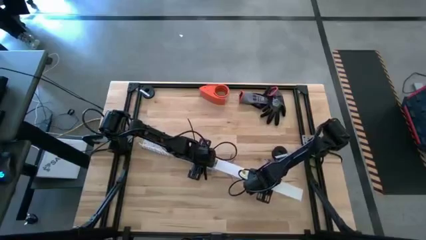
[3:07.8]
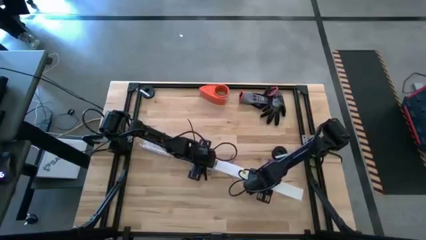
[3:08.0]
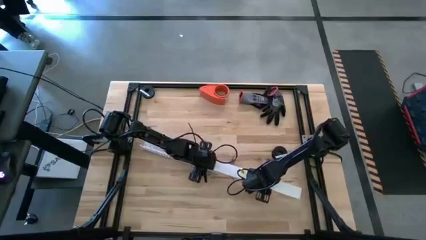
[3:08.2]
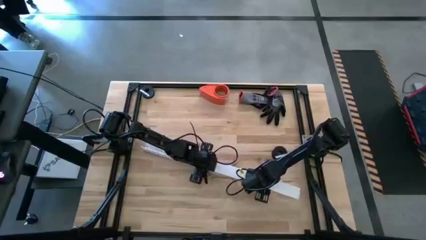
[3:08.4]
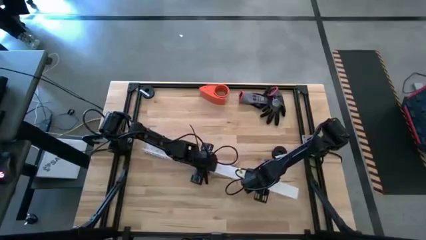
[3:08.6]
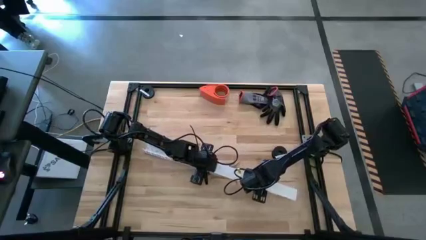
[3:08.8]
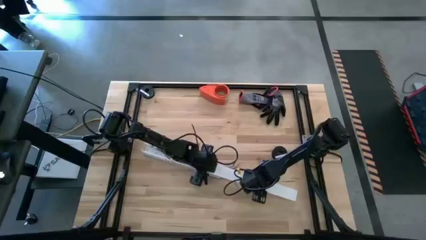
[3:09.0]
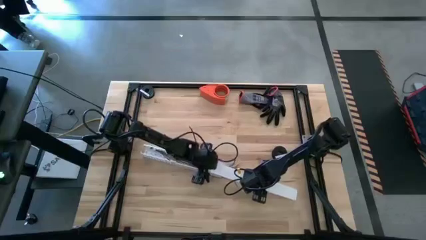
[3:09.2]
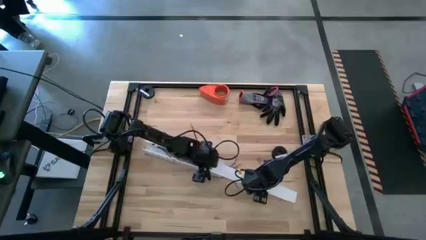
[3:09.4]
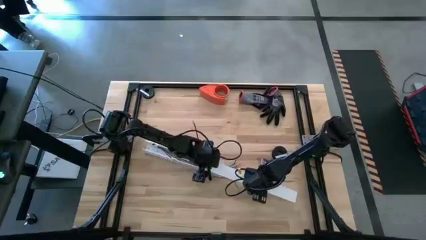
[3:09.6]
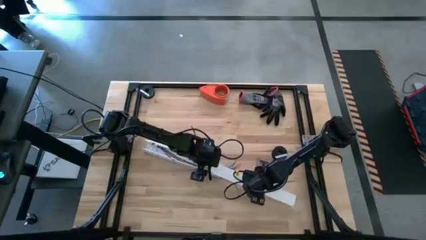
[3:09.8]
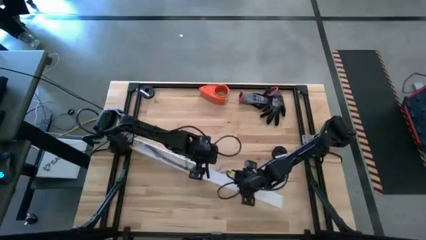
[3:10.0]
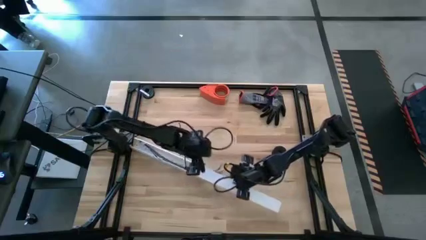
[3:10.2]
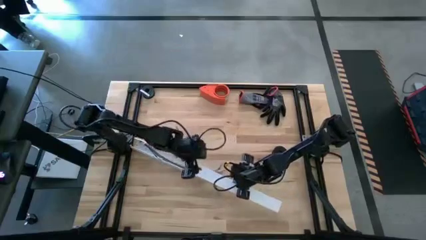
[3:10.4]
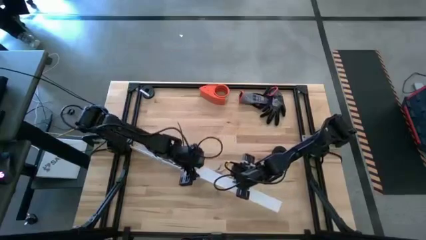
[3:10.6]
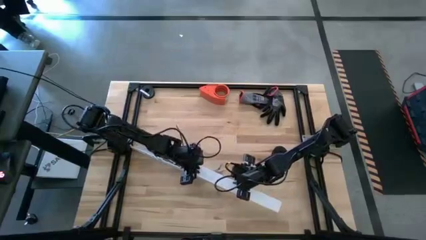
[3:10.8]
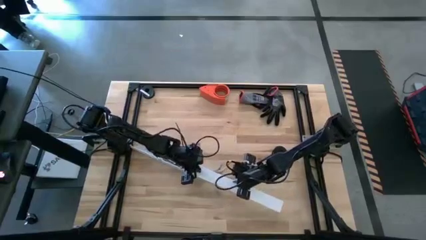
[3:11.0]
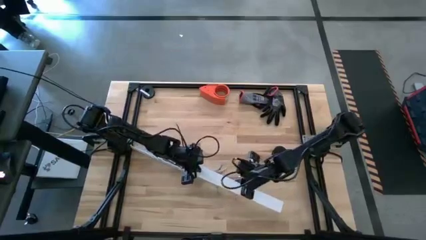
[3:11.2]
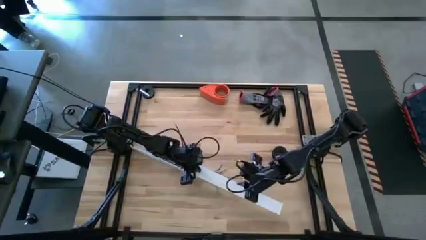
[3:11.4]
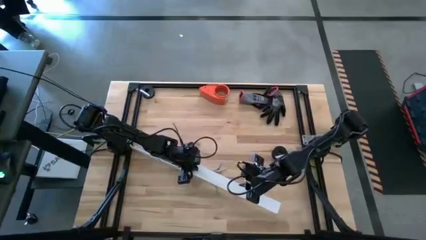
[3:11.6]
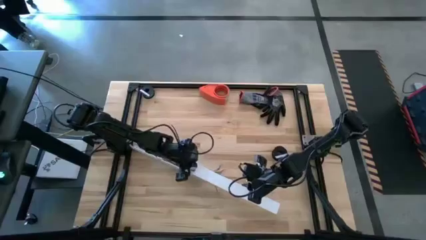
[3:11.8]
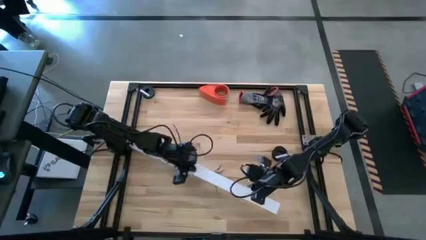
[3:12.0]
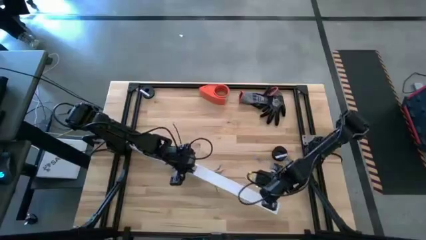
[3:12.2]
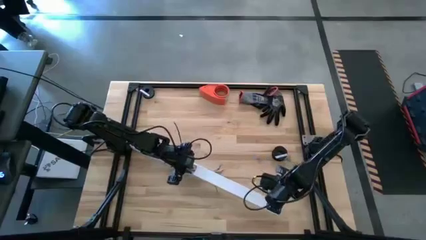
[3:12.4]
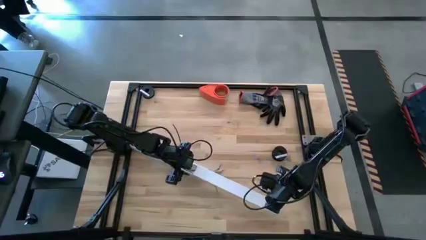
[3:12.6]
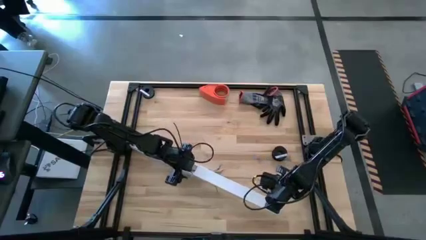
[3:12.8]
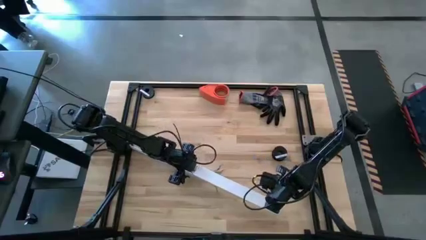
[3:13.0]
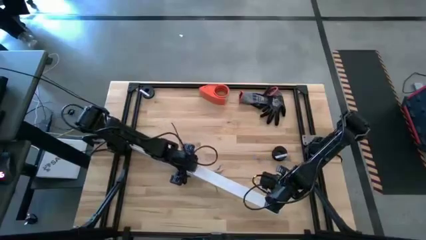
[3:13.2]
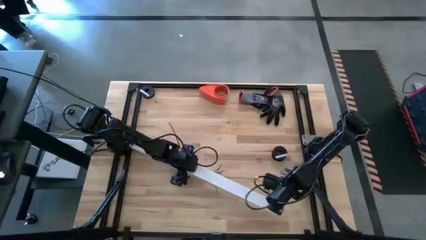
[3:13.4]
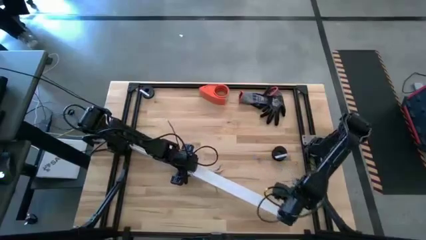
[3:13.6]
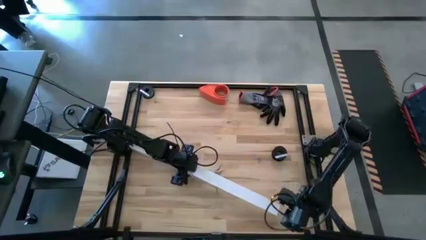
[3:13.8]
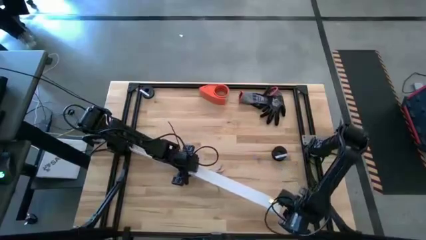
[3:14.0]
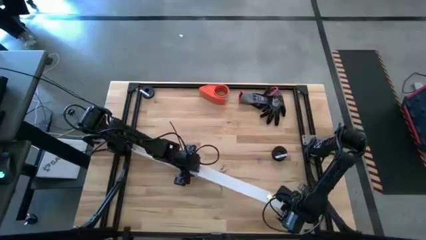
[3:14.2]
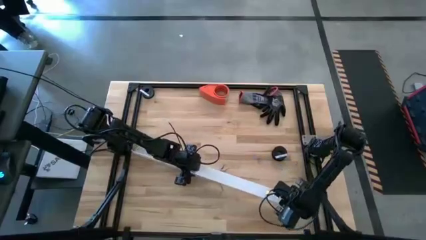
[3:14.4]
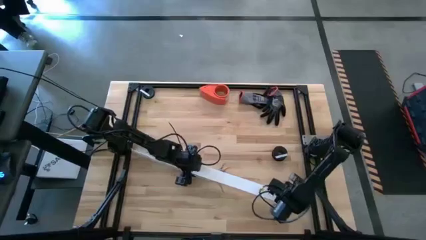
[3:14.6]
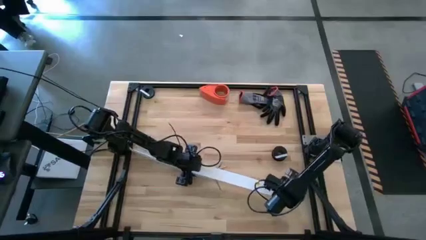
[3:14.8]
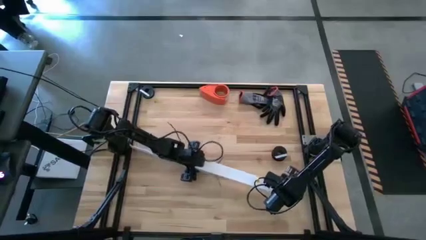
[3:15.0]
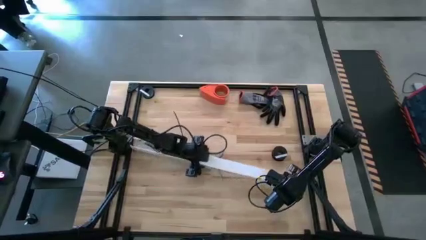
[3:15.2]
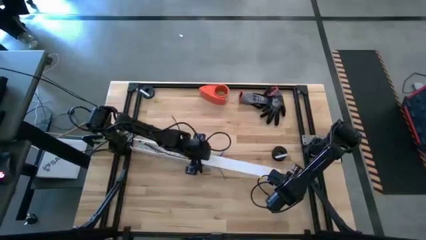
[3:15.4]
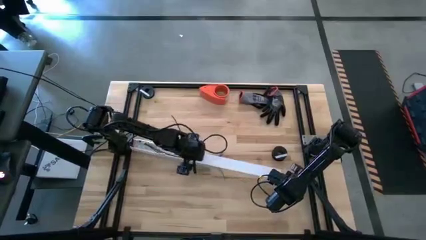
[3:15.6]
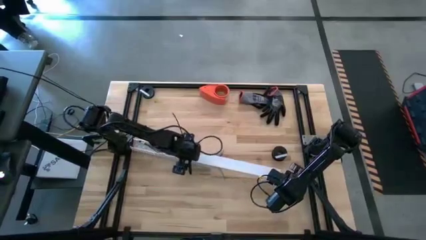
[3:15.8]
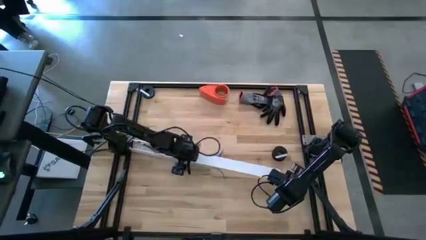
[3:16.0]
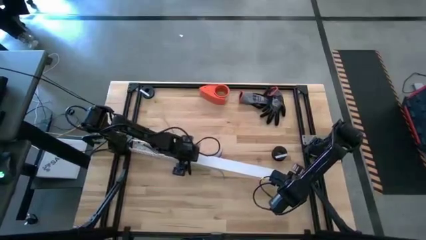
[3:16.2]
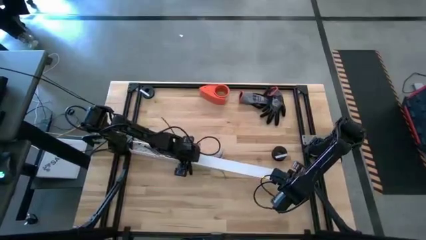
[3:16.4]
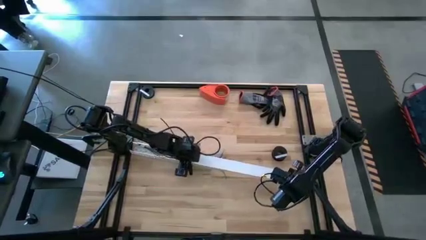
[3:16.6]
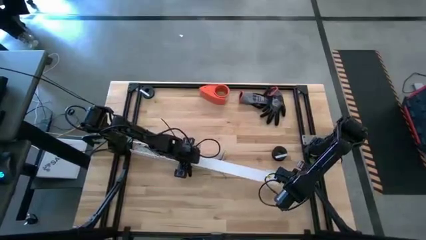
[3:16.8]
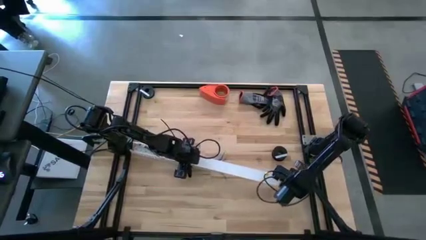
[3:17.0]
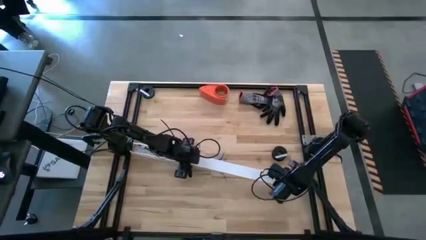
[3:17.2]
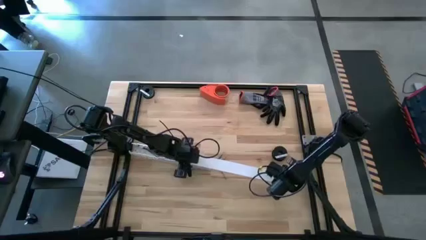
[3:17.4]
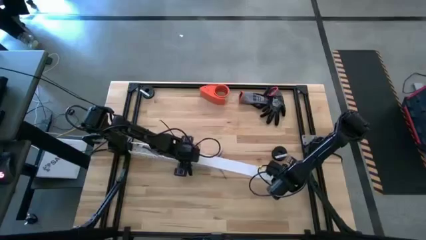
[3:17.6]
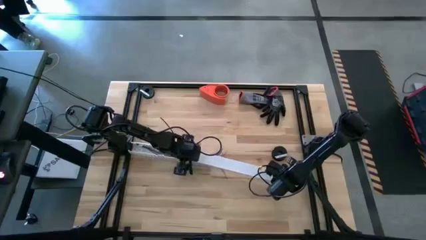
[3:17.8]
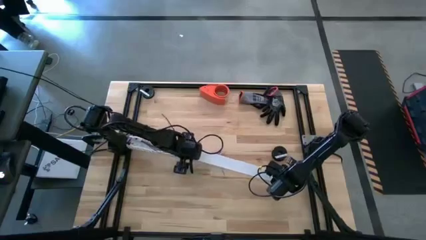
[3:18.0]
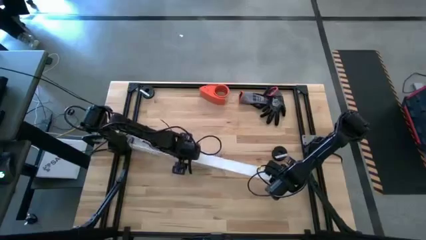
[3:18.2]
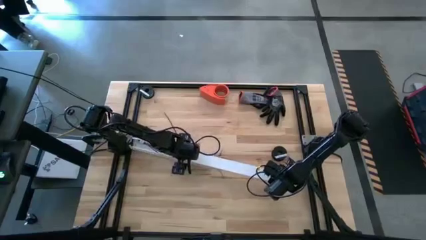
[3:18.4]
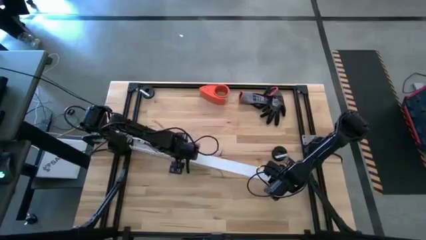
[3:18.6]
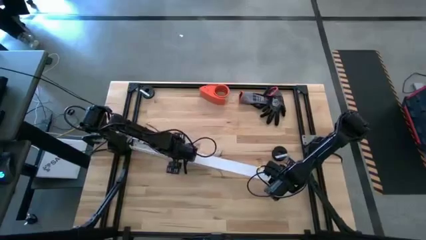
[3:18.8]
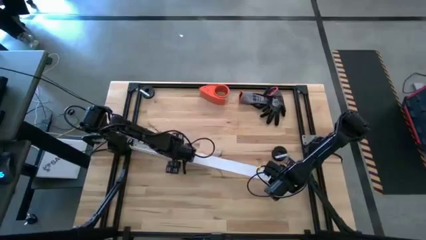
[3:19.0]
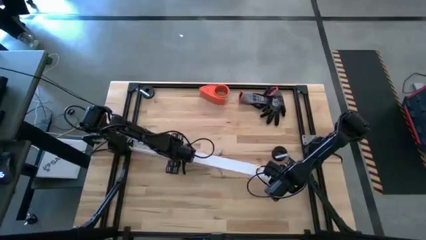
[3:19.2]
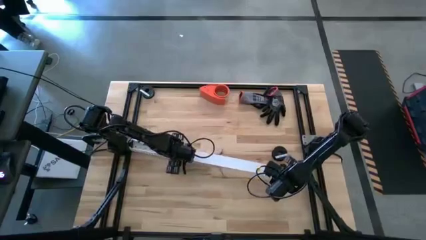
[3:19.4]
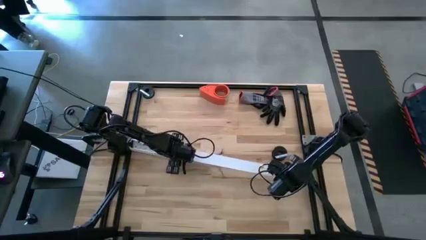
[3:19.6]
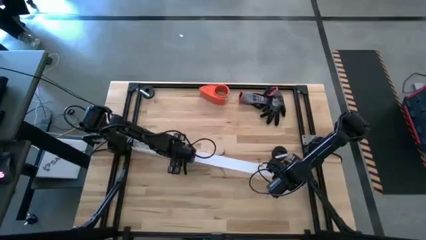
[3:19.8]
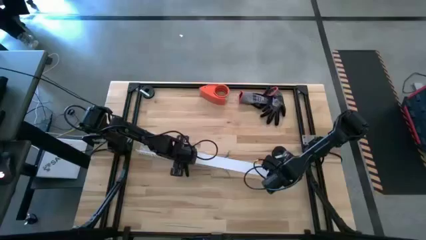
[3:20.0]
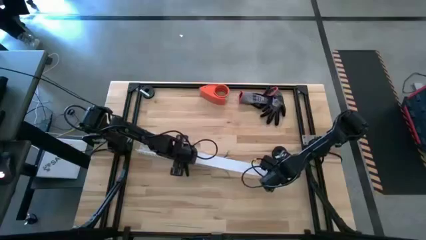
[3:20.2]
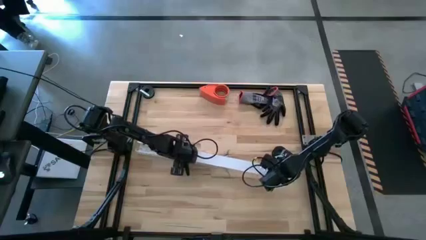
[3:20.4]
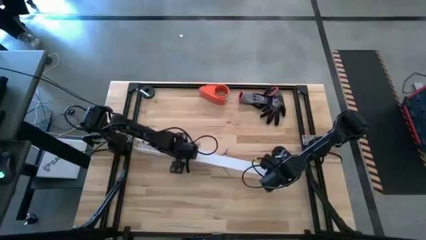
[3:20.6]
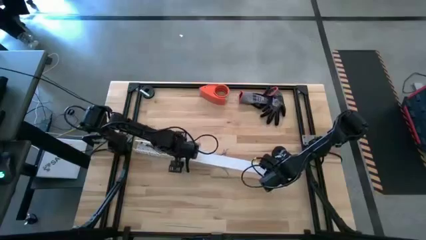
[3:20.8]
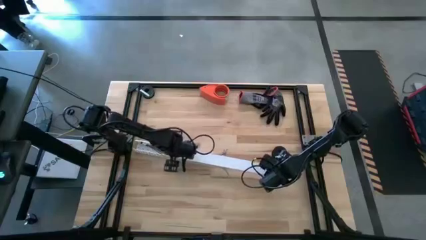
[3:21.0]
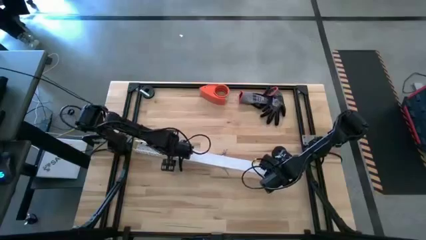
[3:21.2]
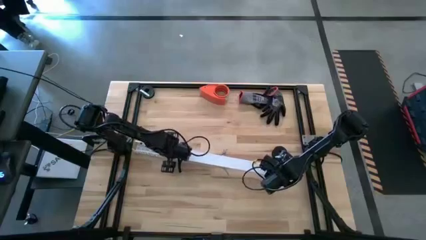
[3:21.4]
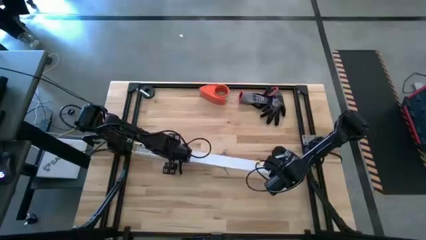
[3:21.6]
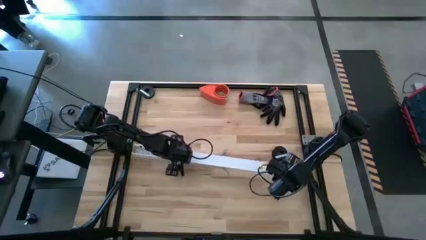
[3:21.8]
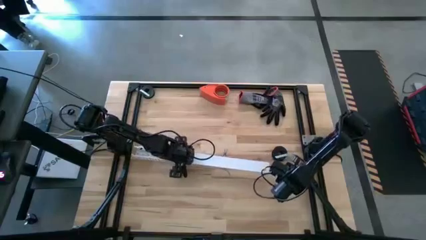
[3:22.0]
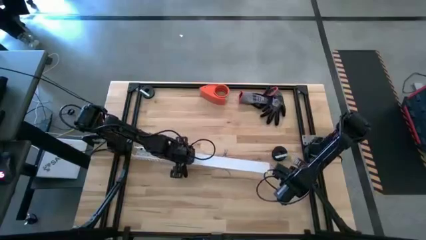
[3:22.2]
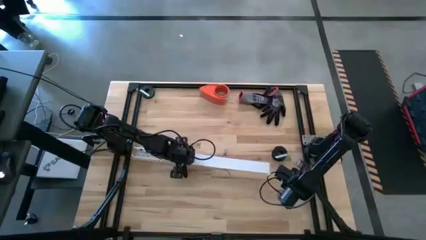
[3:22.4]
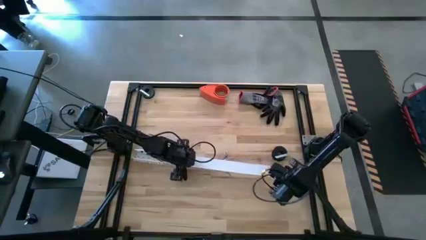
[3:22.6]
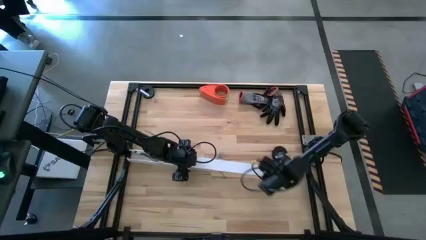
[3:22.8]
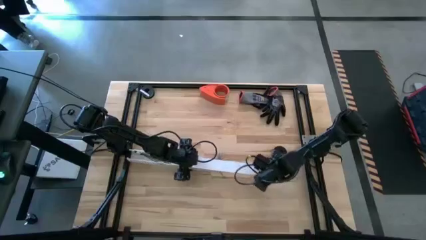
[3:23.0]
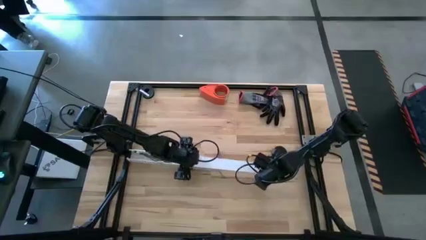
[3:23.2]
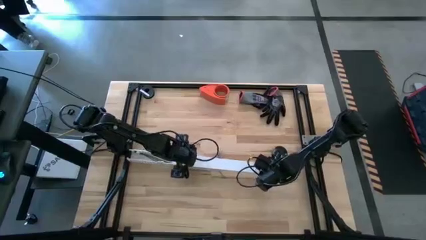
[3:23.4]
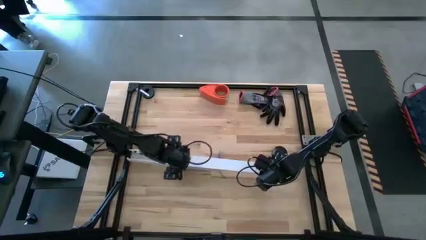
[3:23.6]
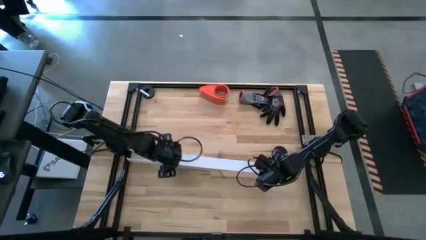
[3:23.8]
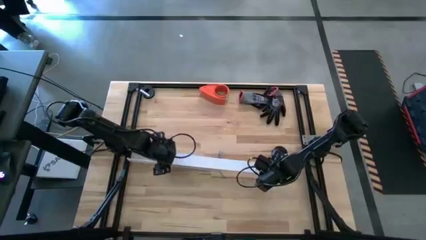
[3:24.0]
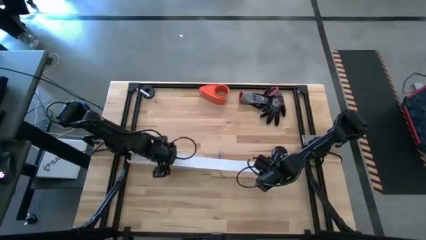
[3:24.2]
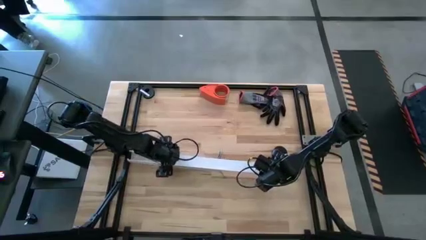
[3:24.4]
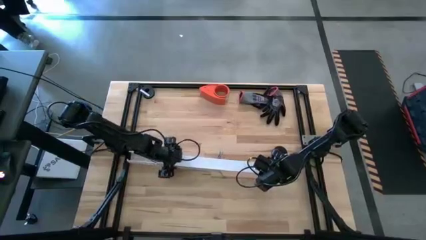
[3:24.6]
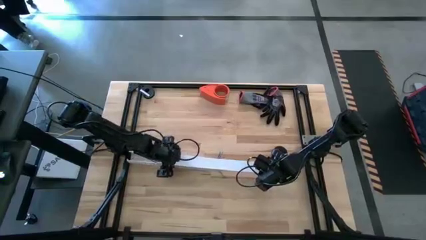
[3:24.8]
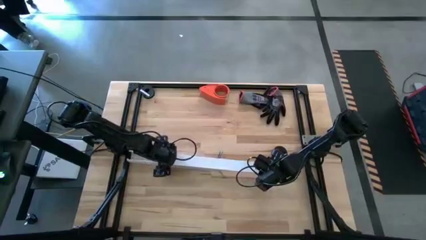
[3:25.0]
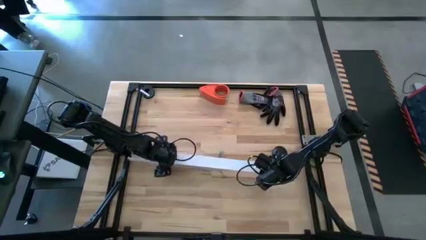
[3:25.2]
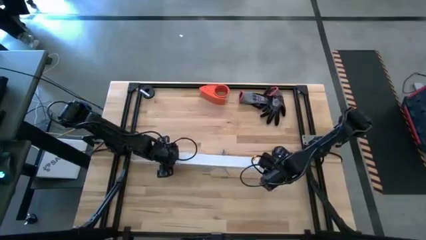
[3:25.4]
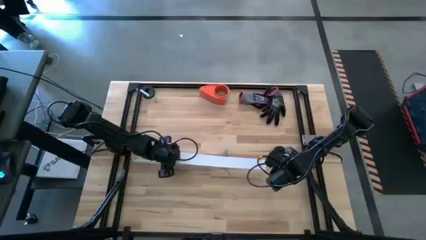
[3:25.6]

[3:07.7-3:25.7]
Task: Ziptie cables
Close the white cable duct
